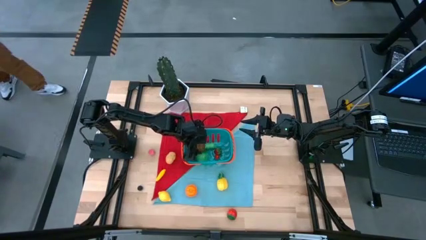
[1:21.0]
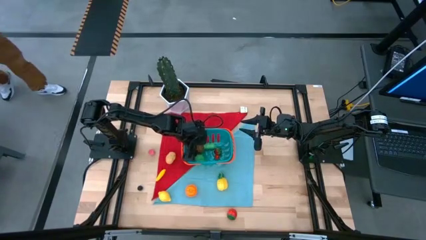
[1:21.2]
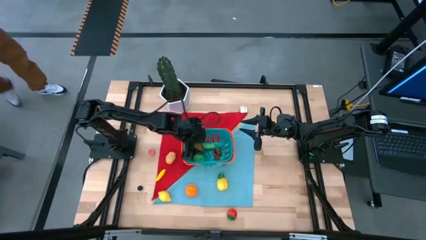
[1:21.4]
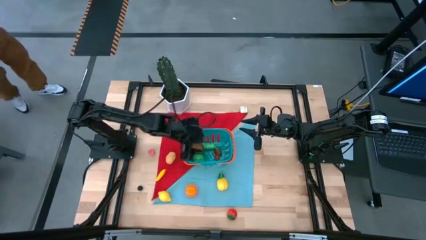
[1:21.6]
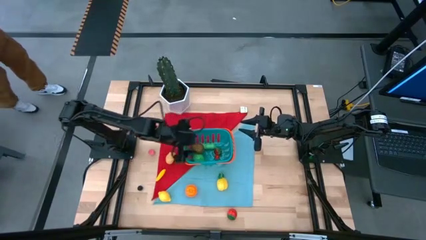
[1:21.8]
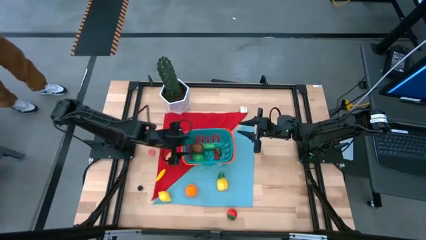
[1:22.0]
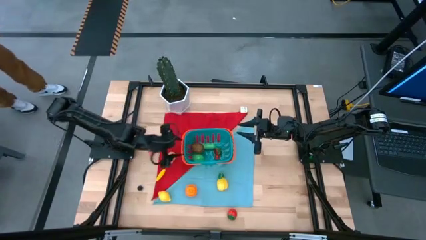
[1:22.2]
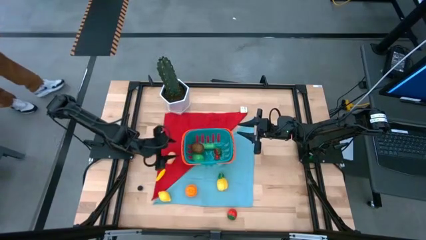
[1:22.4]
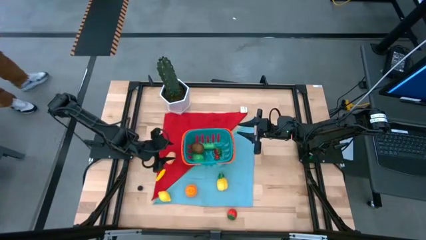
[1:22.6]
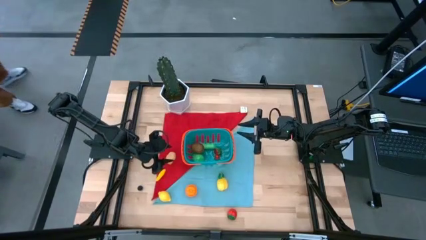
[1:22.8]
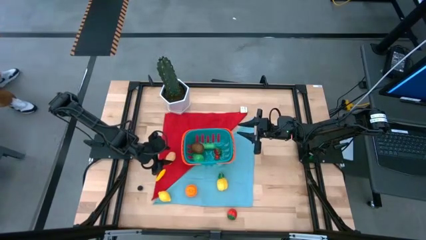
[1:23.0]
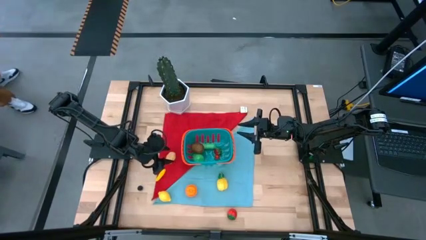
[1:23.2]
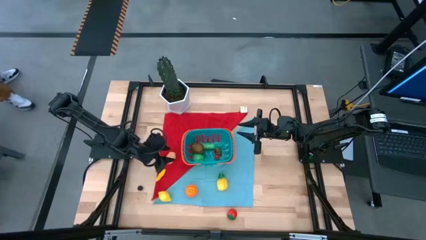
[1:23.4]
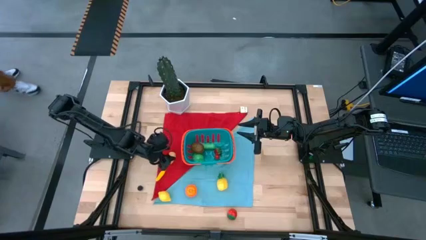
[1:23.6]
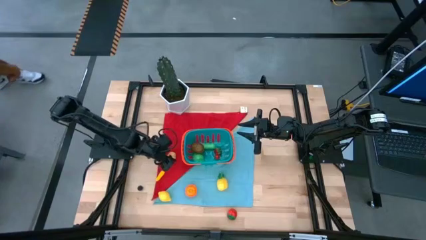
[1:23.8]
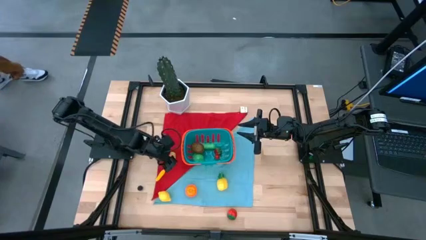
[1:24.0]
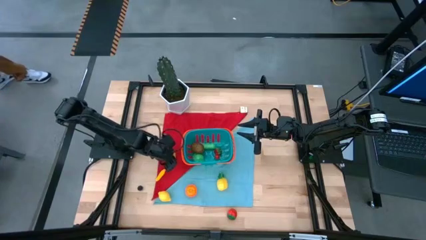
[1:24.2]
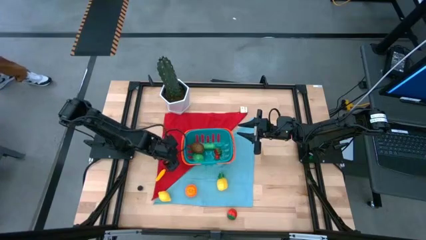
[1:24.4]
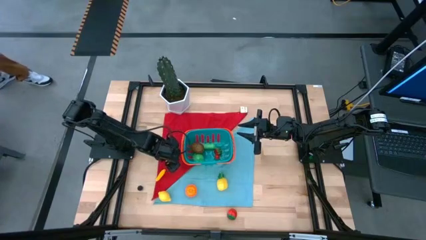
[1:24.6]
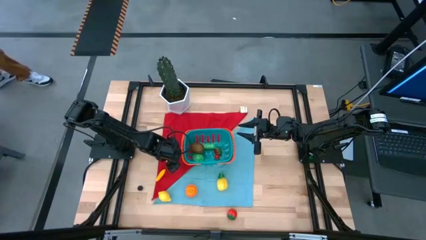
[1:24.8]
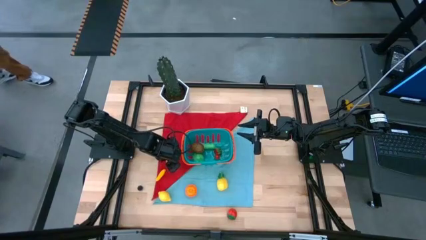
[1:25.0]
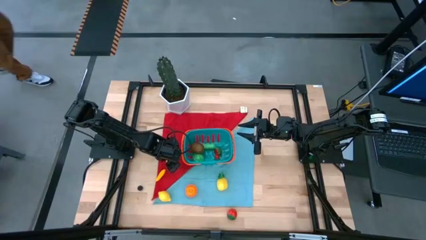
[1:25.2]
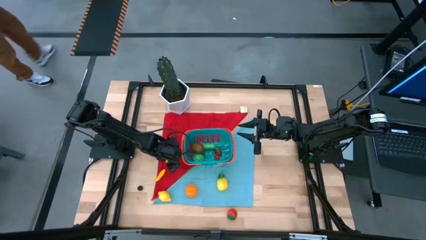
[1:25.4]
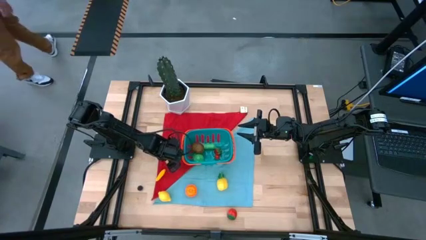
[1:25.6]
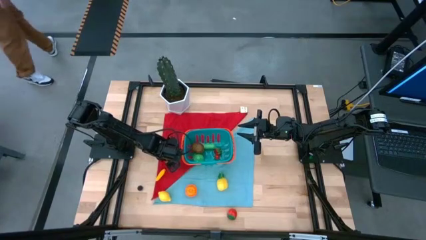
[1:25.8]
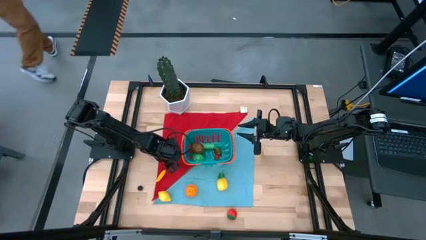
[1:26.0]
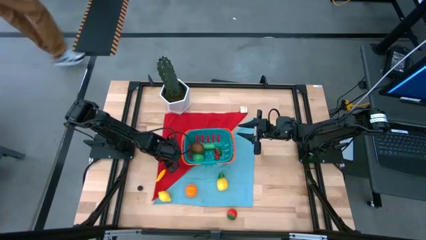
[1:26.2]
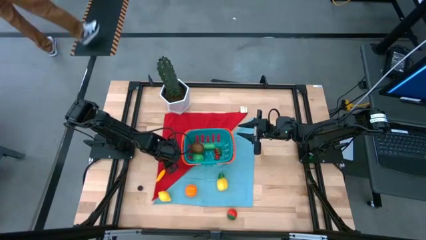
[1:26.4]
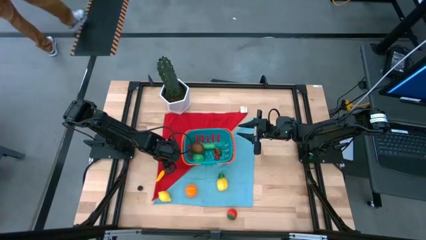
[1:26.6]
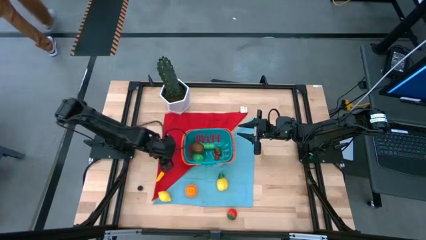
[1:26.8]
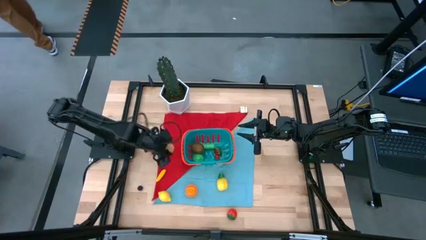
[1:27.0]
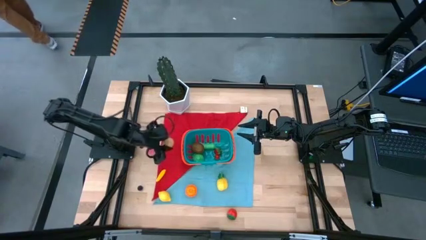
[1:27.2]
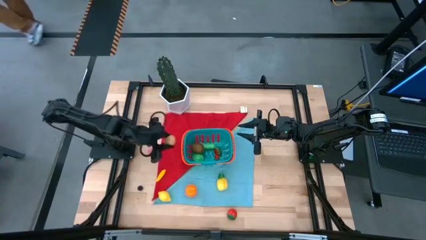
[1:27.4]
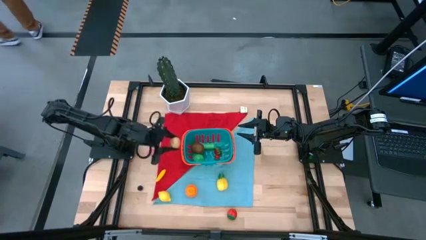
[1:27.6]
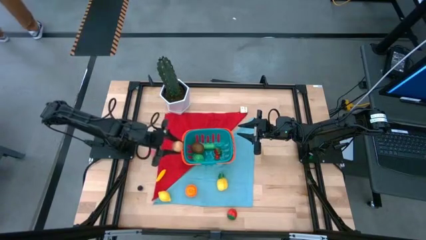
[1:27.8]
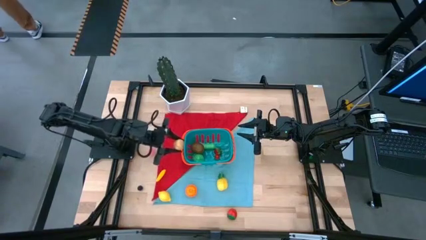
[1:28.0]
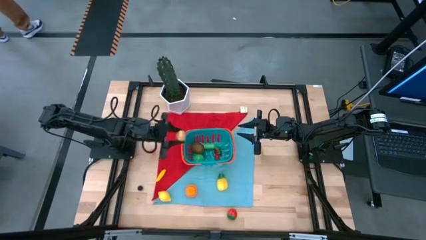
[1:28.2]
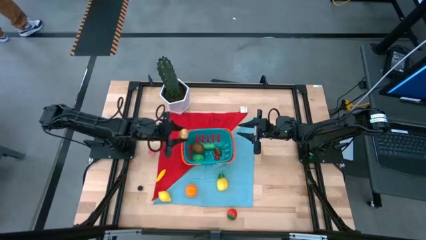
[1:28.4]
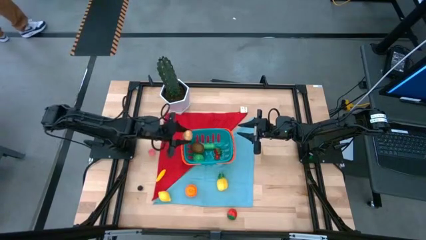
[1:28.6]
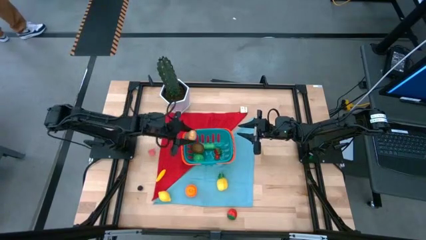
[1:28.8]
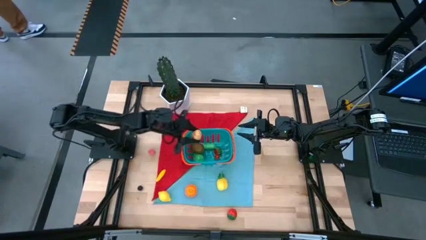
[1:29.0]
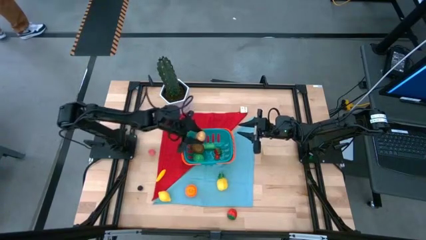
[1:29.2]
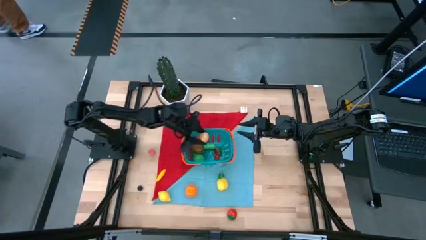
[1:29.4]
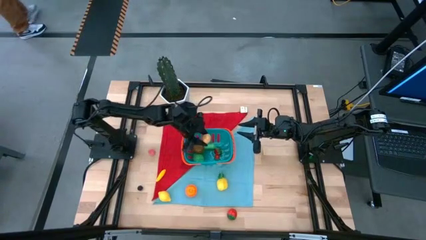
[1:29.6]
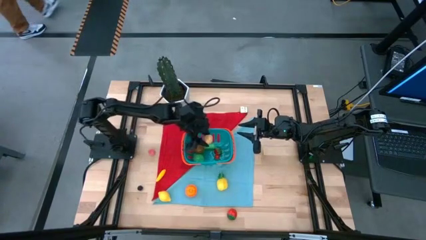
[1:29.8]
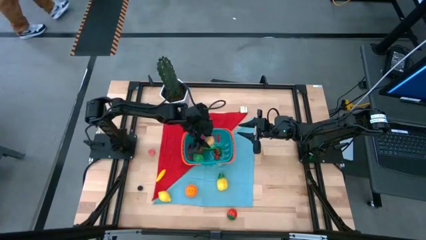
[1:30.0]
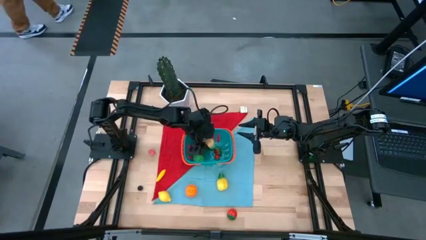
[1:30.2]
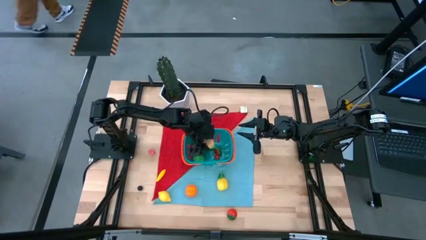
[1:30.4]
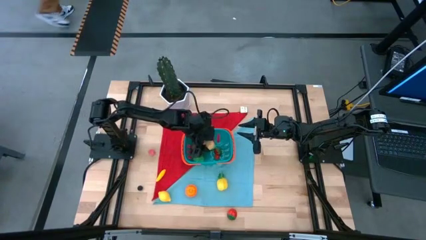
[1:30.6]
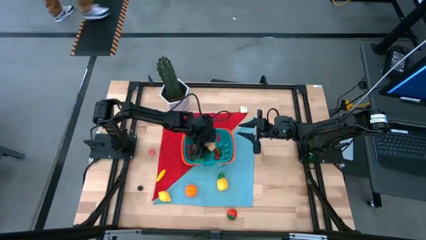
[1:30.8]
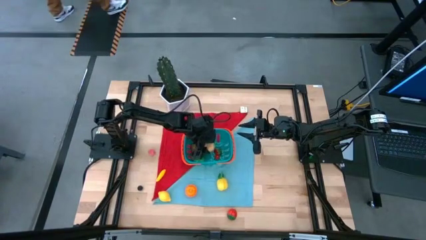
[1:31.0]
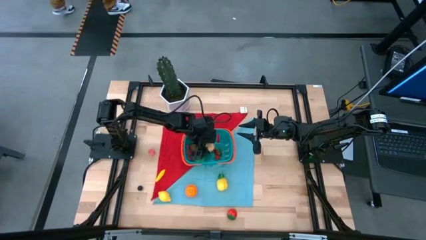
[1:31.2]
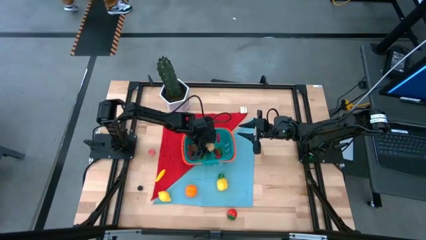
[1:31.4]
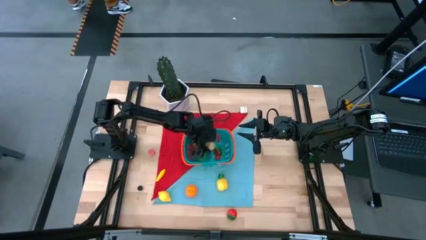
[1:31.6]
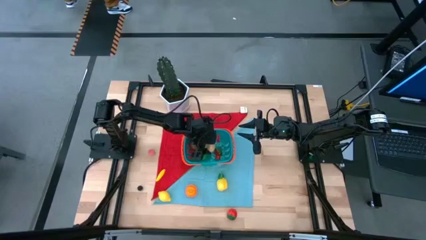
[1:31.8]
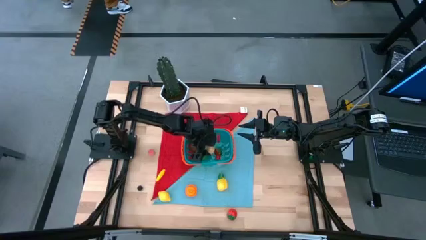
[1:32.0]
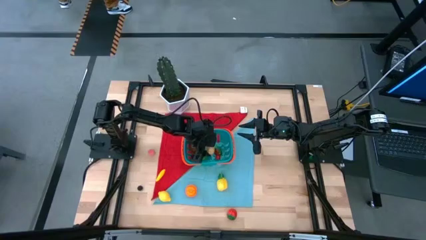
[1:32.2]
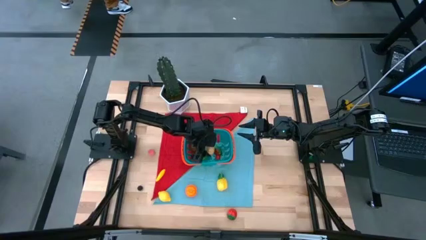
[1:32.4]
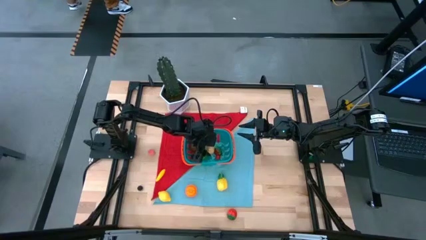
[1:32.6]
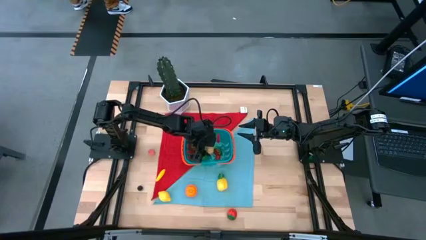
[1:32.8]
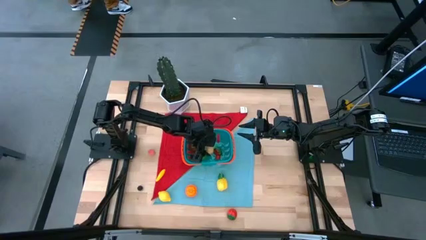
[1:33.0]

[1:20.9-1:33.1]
Task: Build produce basket
Put the light brown potato into the blue basket
